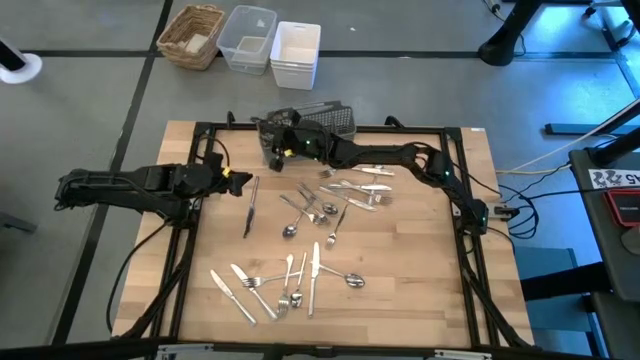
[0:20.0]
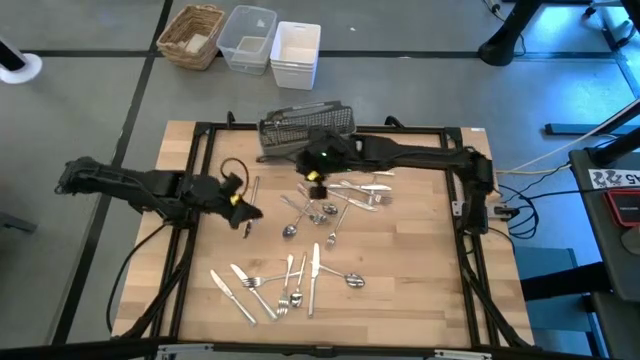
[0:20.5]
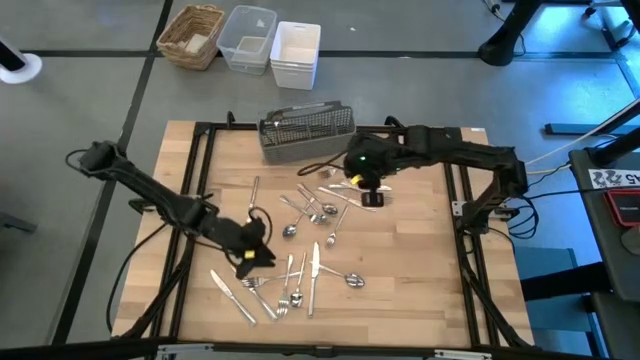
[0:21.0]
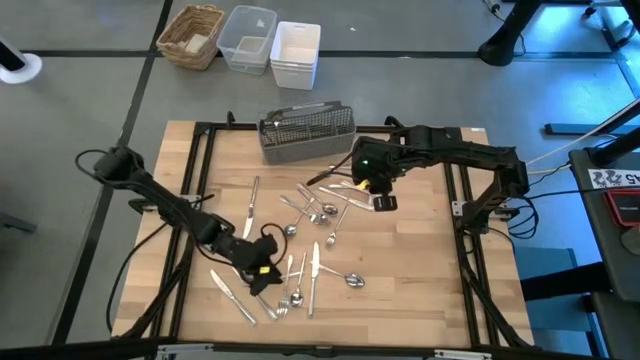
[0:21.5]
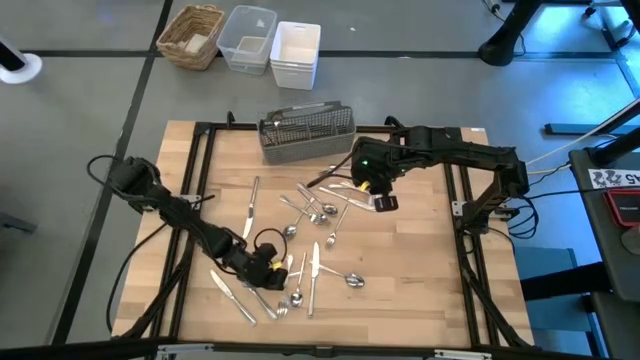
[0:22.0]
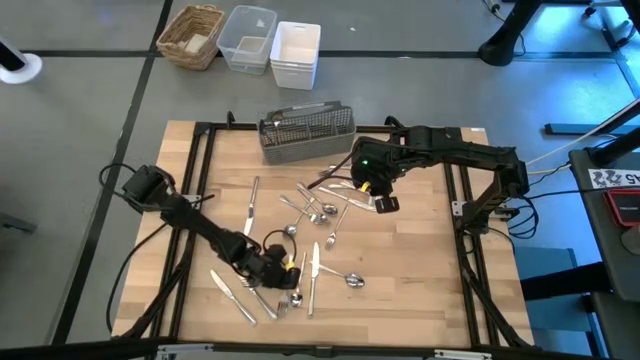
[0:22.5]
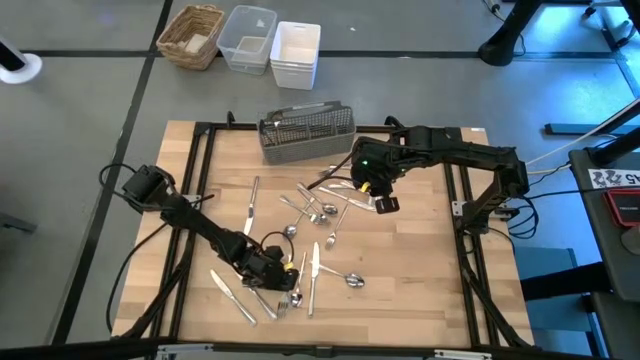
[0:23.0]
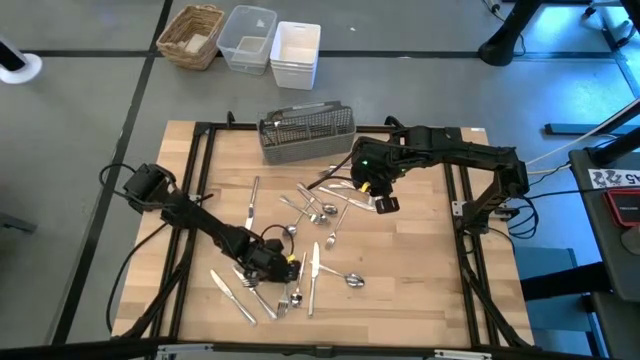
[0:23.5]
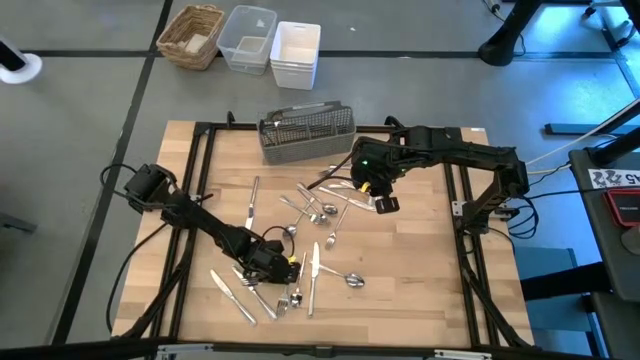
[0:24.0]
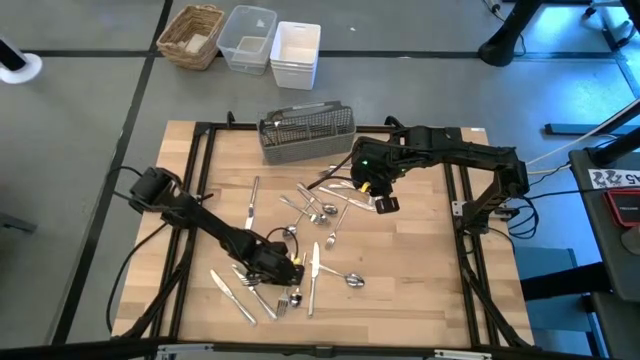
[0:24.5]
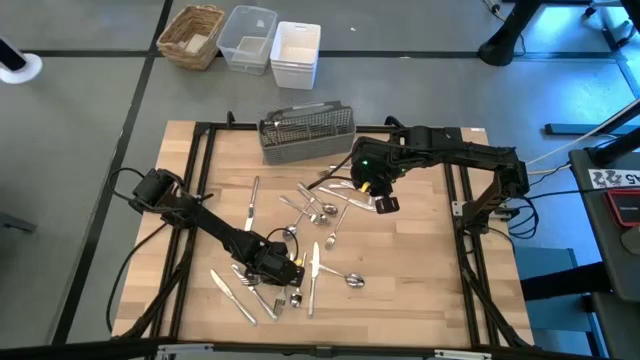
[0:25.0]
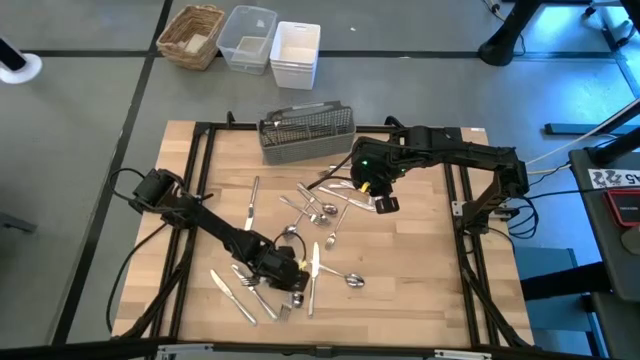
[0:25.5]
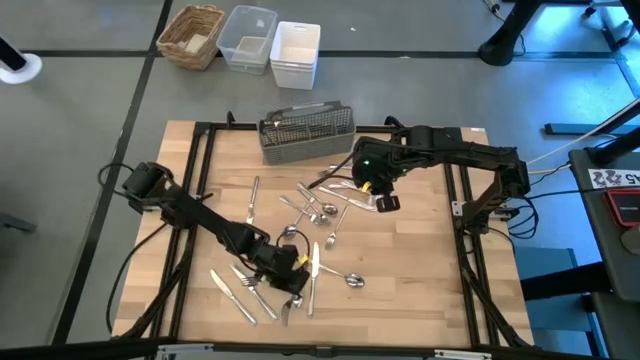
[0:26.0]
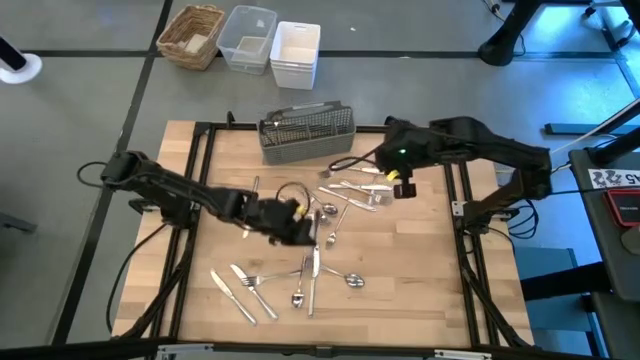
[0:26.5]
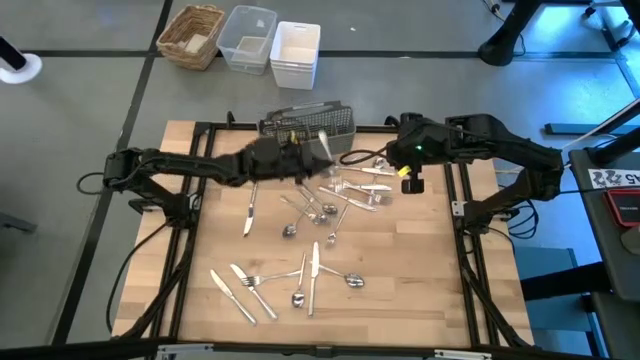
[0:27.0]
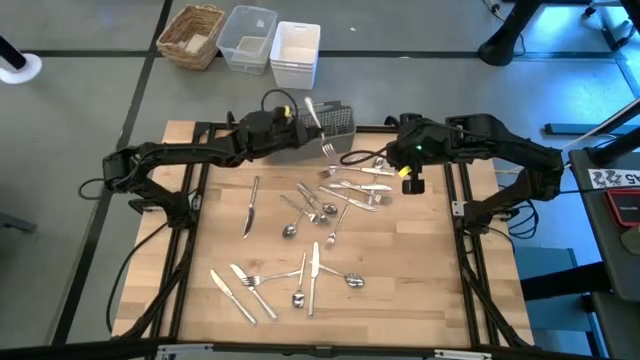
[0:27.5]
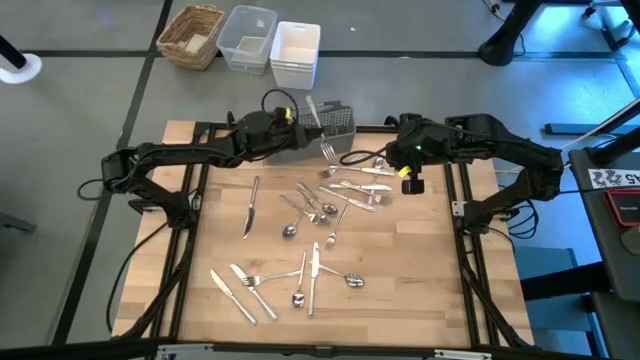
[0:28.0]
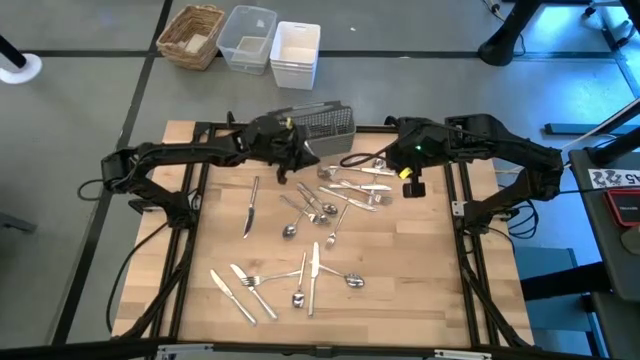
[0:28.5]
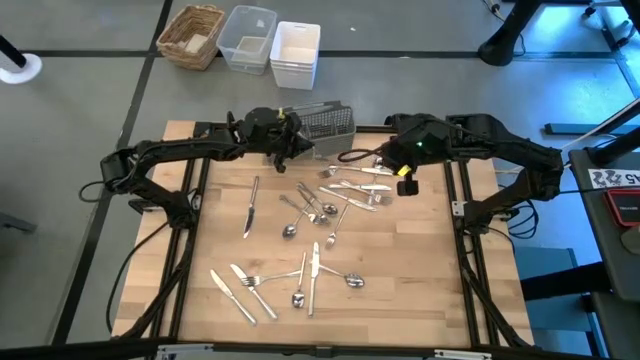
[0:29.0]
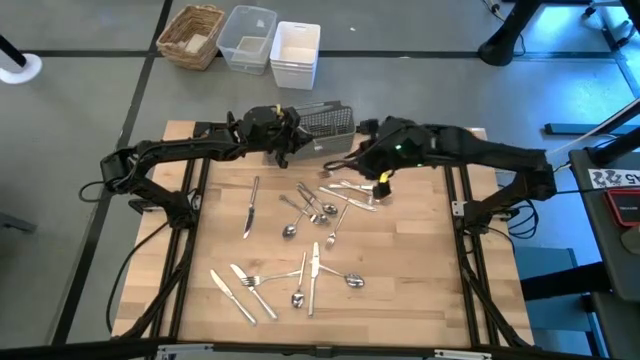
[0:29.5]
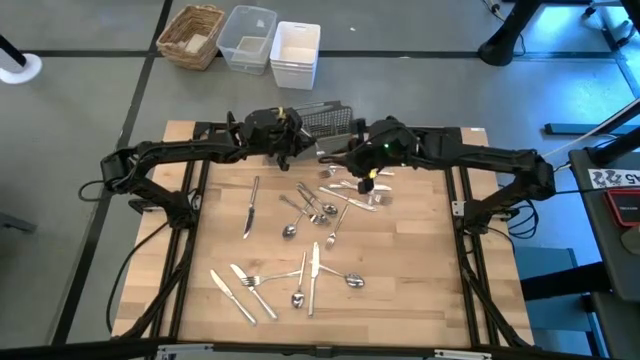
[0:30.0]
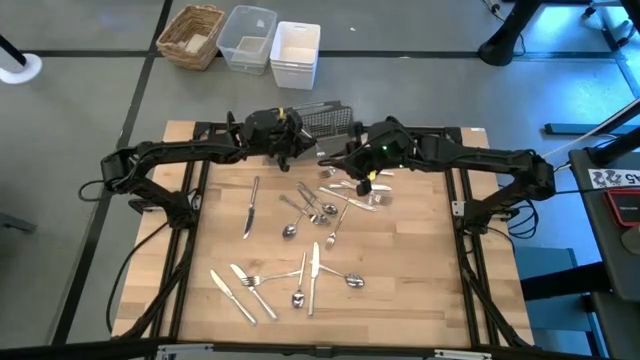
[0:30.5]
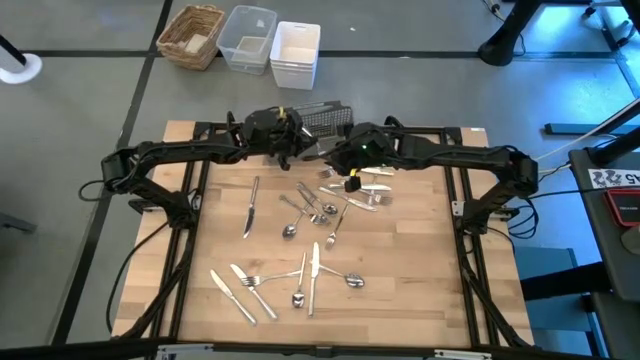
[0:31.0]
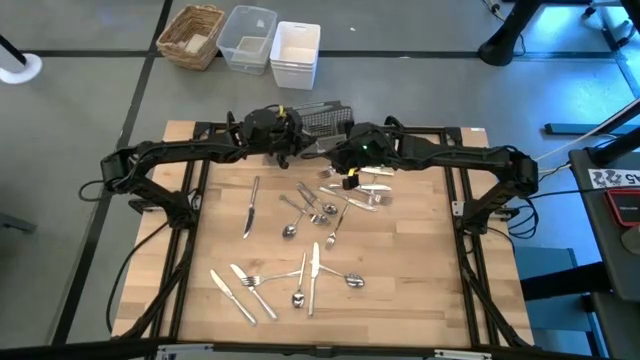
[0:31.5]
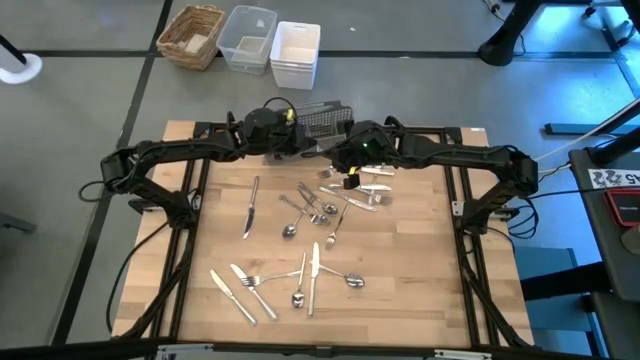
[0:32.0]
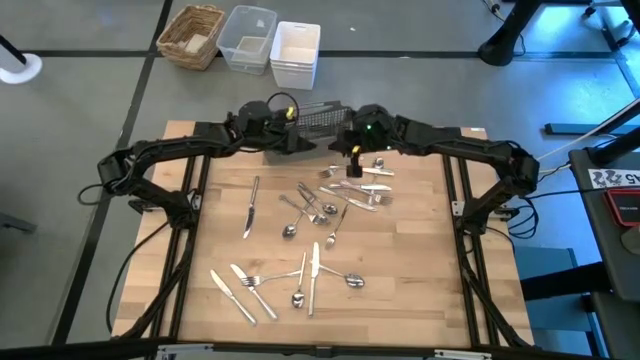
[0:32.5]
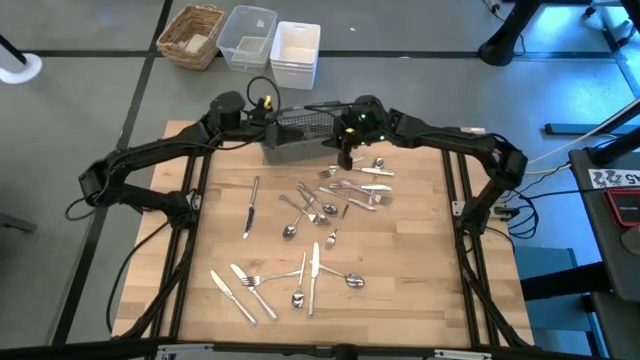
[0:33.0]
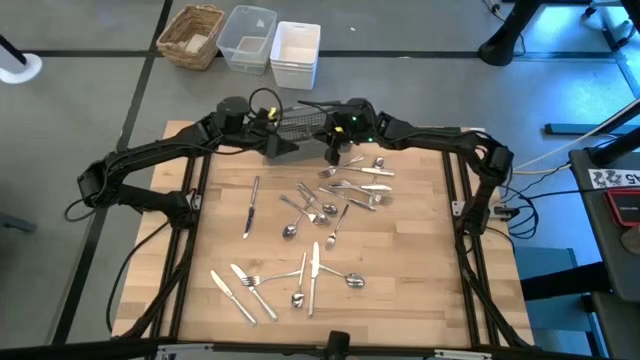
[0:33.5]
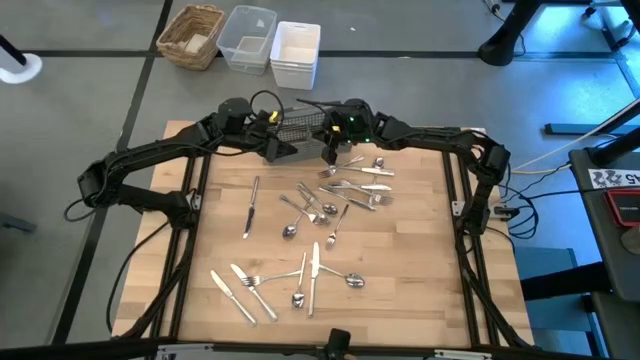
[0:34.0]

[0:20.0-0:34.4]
Task: Sort silverware
Put the silver fork into the silverware rack

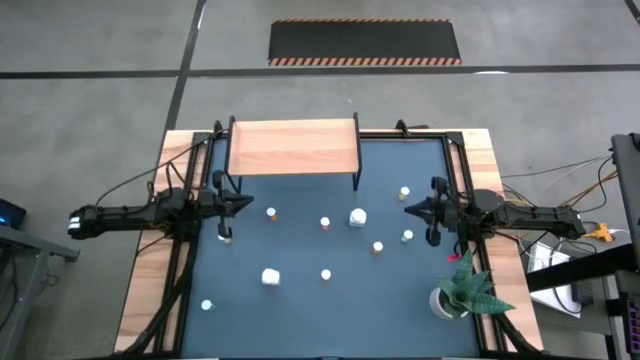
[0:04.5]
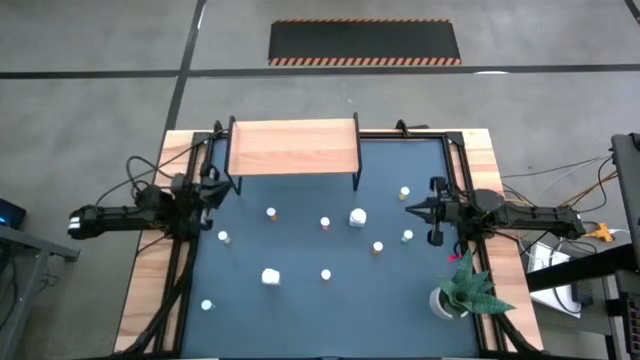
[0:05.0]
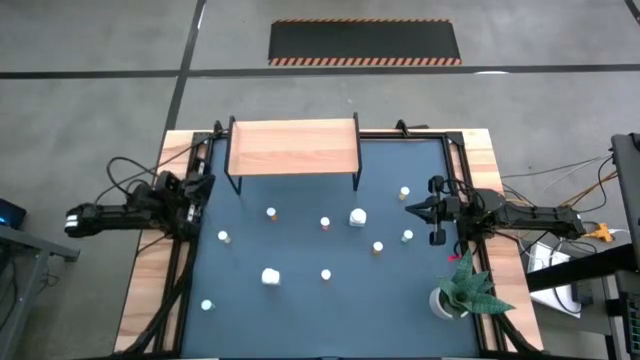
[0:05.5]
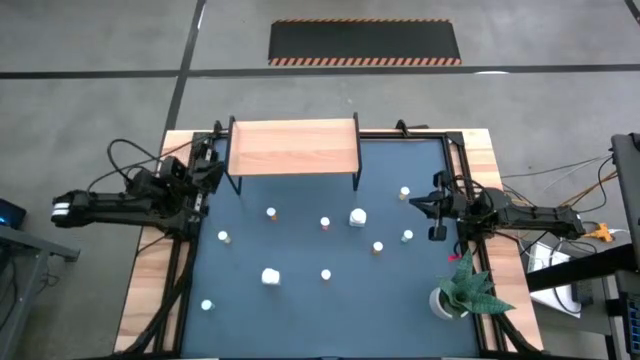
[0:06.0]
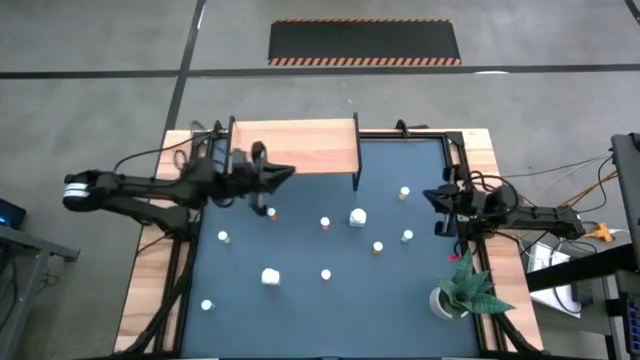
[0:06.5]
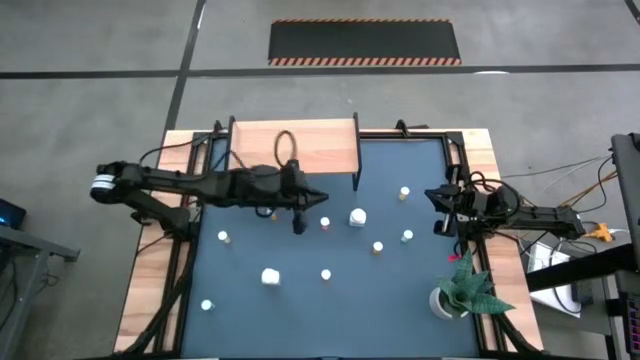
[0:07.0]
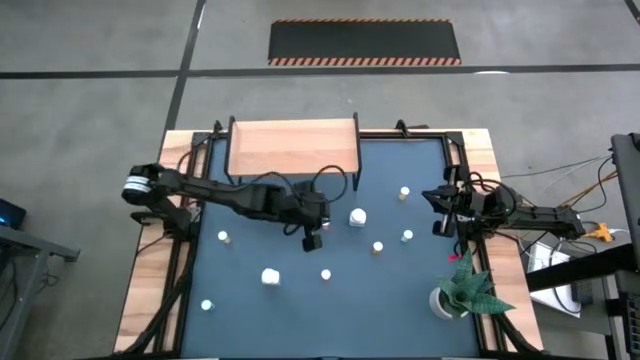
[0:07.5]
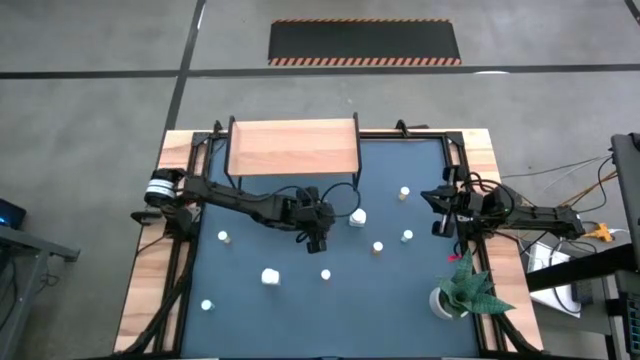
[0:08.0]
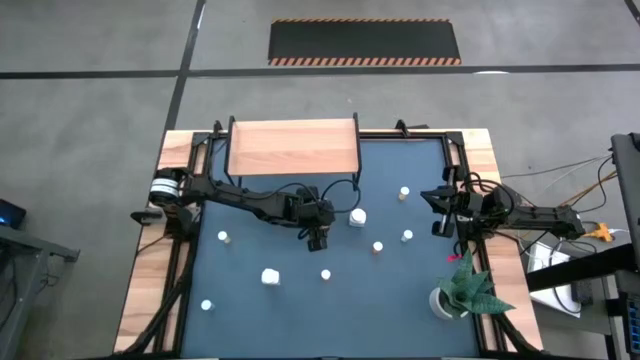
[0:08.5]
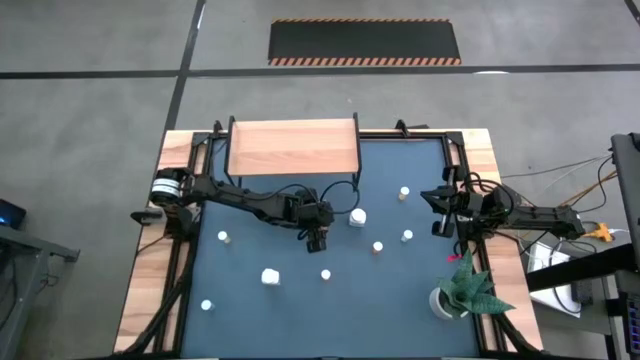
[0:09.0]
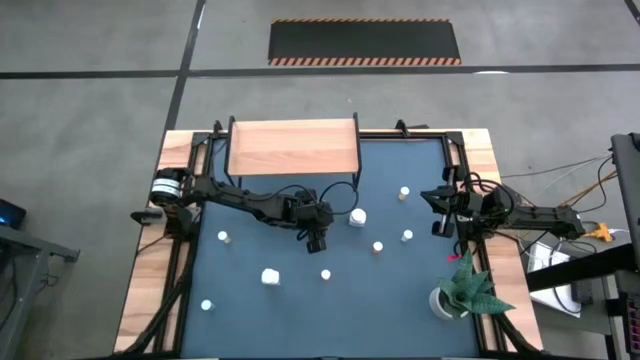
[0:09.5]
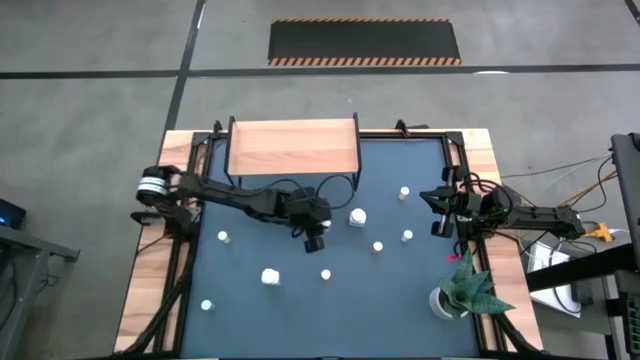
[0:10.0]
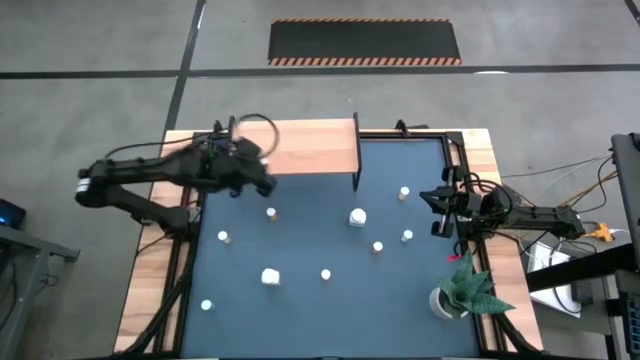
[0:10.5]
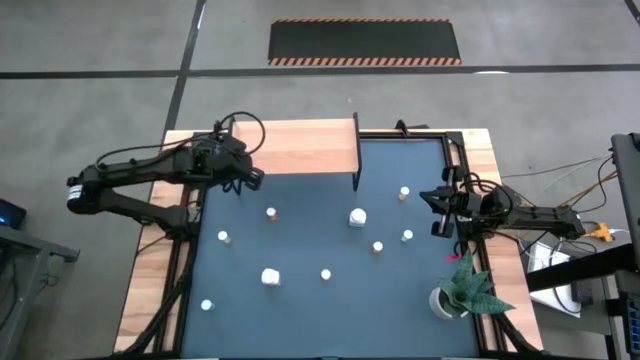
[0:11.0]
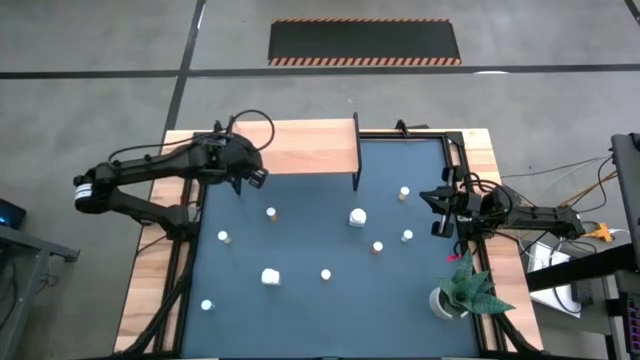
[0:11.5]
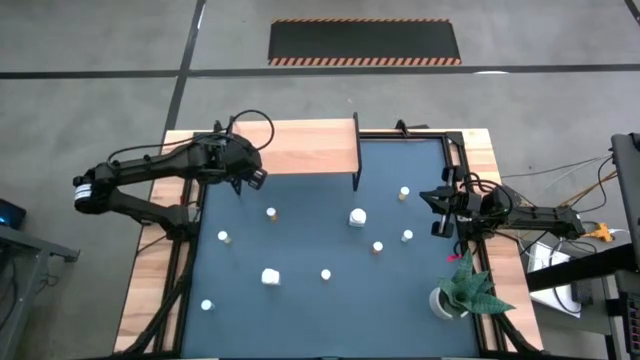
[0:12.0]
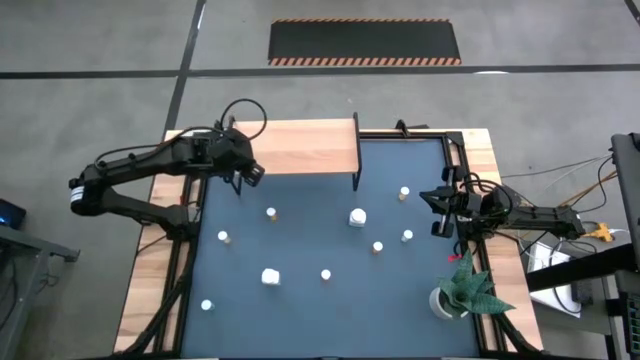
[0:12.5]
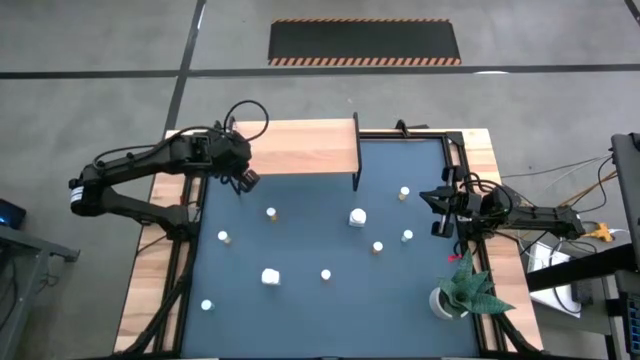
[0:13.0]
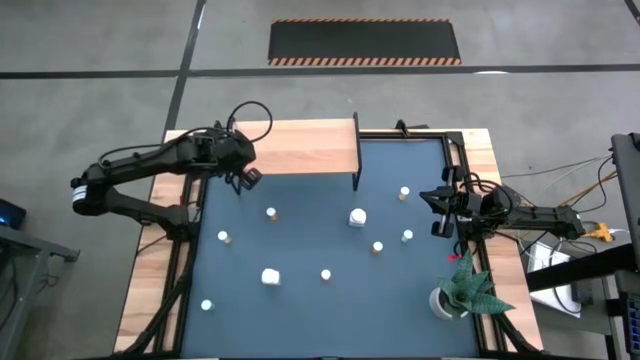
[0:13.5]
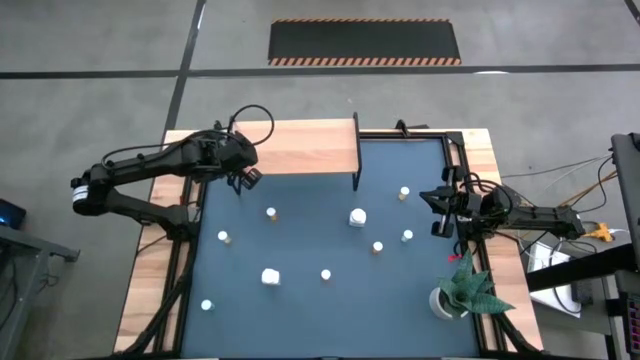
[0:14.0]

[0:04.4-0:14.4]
Task: Pick and place medicine bottles onto shelf by color
Put the top pink pill bottle on the shelf
